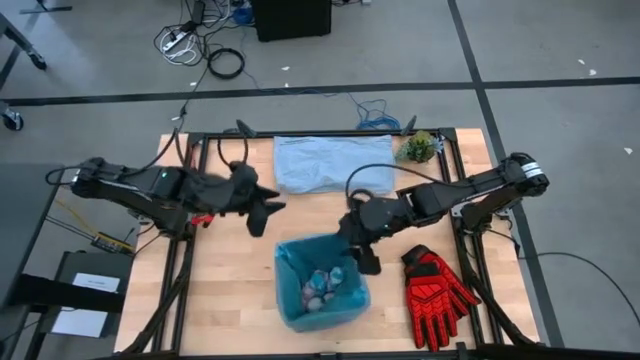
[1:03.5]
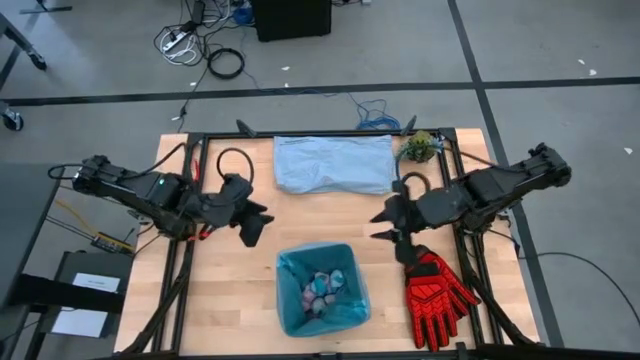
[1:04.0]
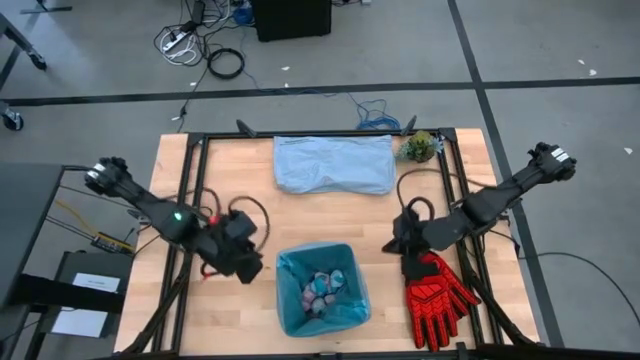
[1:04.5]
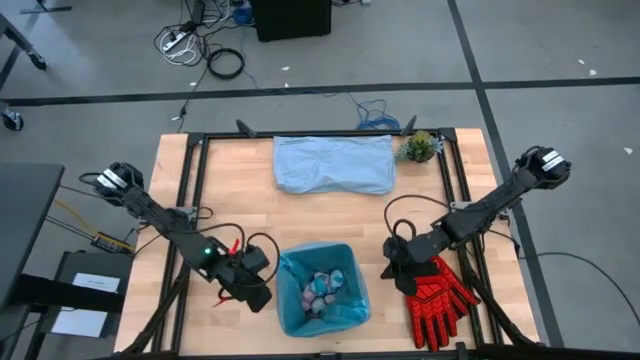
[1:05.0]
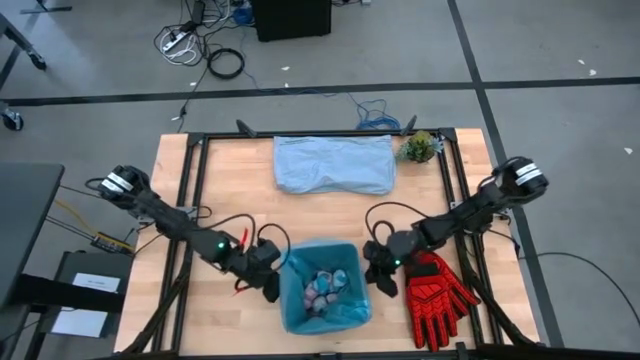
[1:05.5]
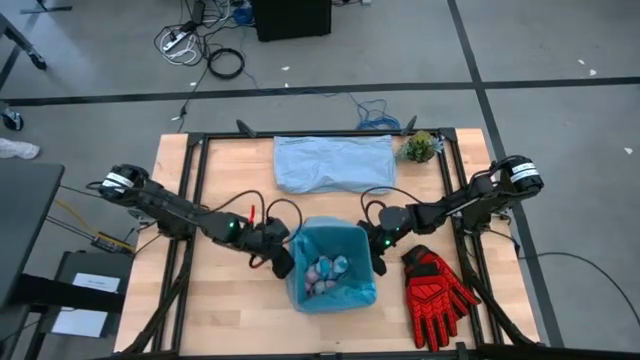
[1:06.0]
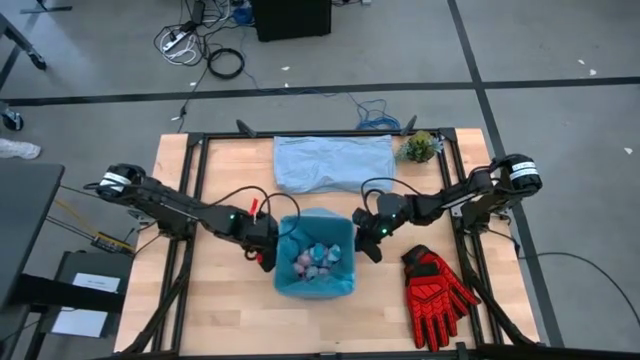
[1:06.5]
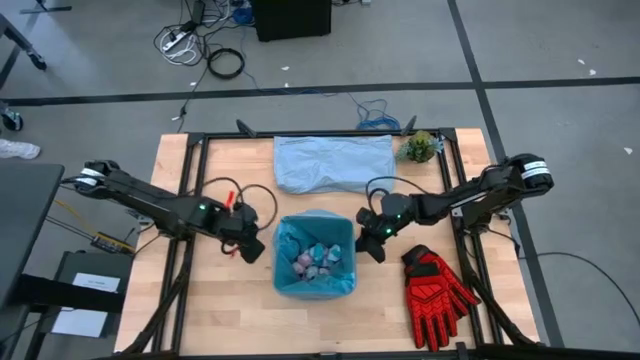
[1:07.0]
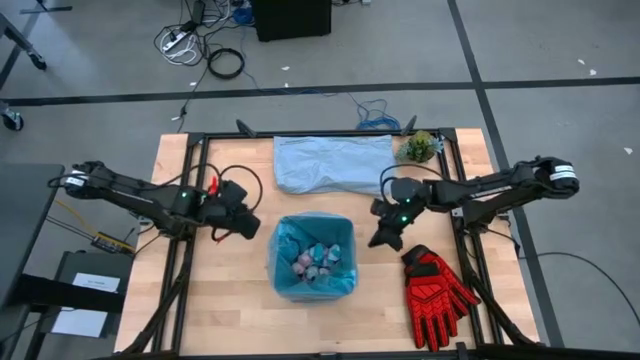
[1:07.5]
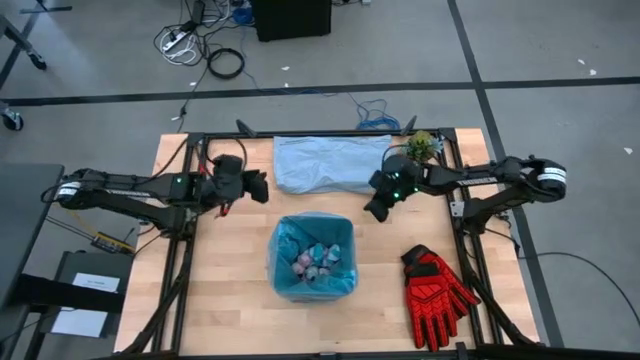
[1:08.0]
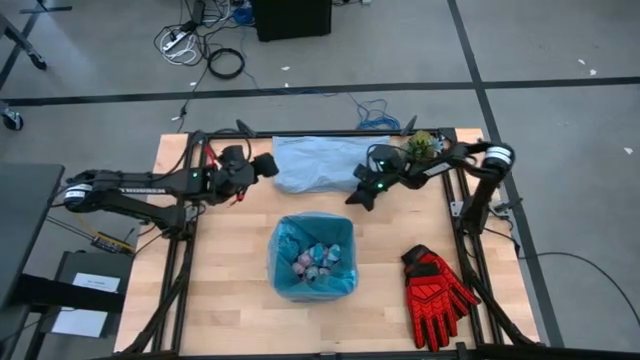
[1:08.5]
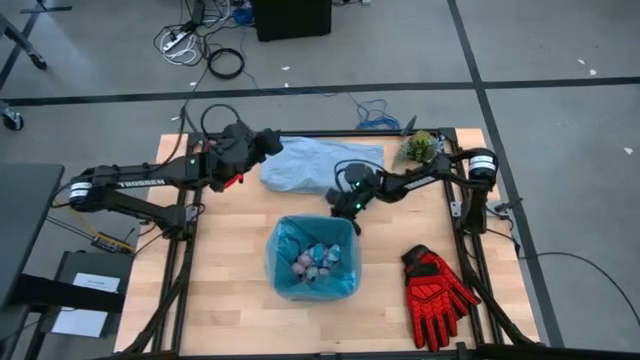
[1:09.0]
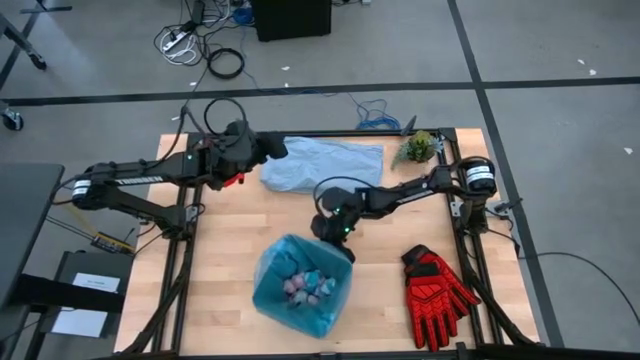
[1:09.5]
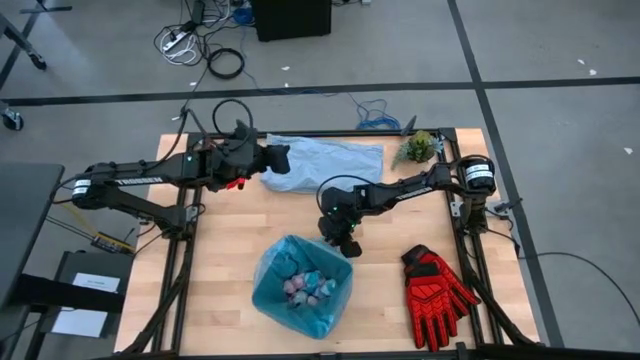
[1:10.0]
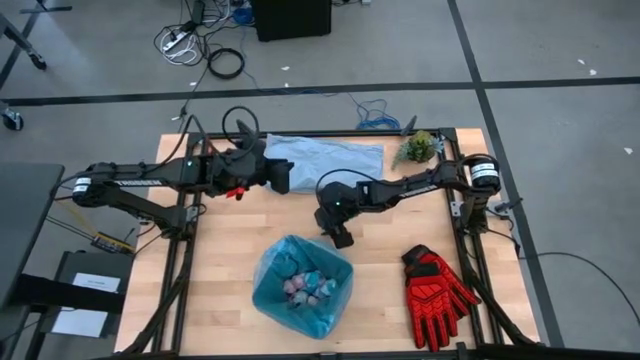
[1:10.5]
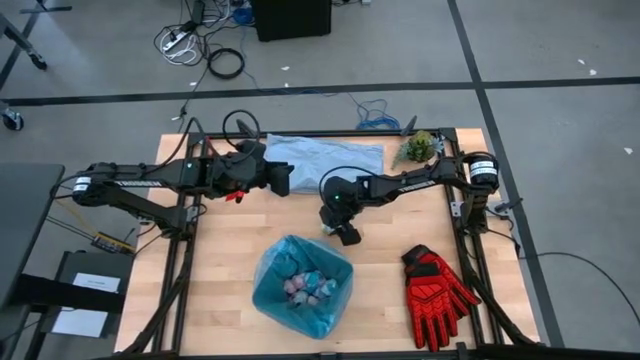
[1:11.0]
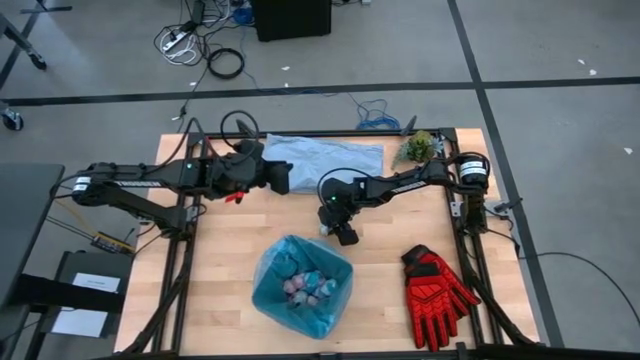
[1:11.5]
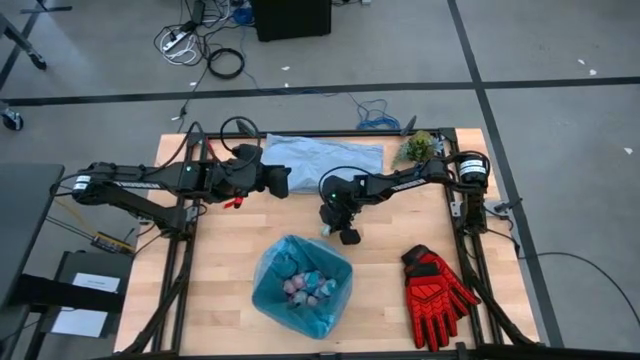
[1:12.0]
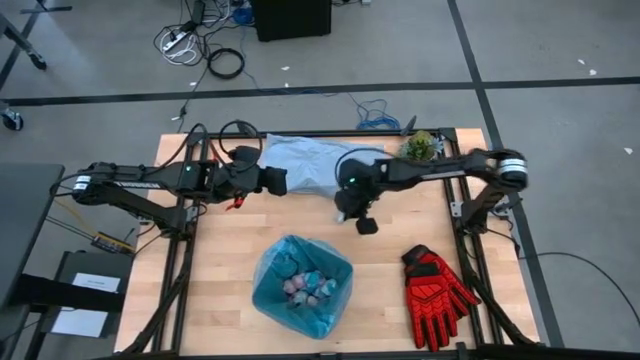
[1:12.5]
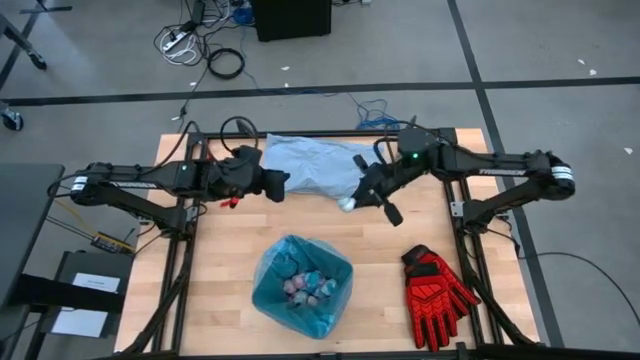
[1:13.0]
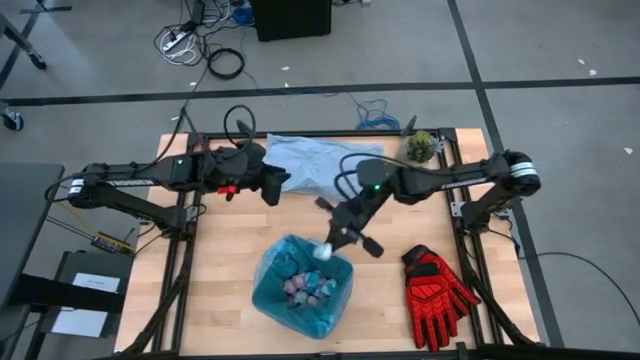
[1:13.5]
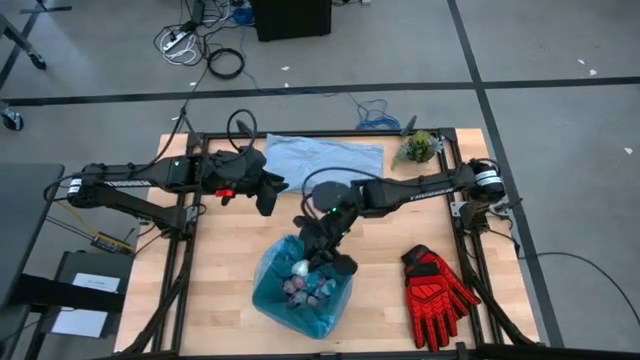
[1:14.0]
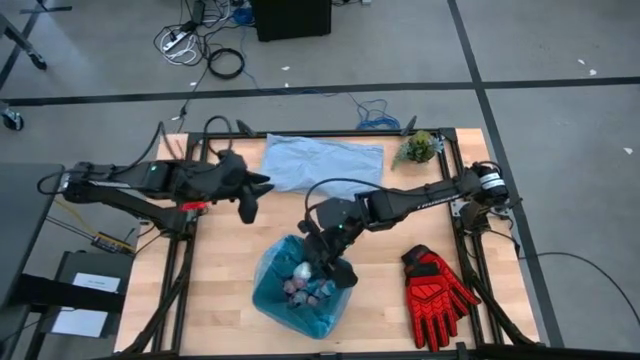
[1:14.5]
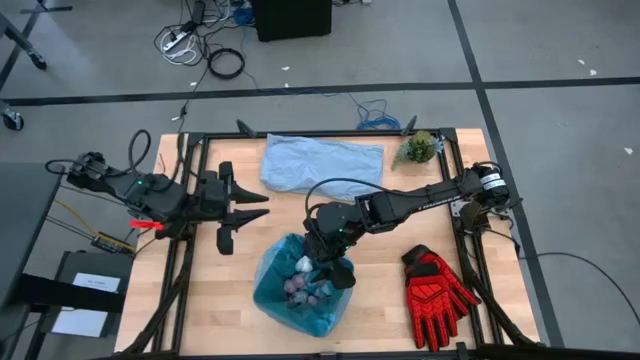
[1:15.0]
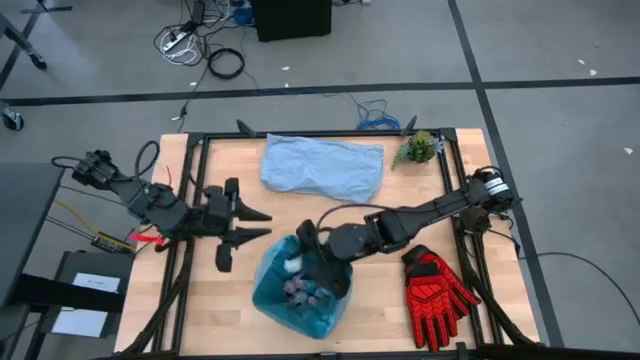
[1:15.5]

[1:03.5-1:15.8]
Task: place trash/remove bag and relplace
Put the blue crumbled trash bag into the trash bin

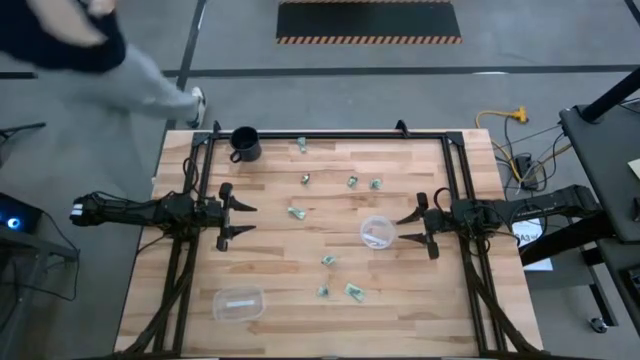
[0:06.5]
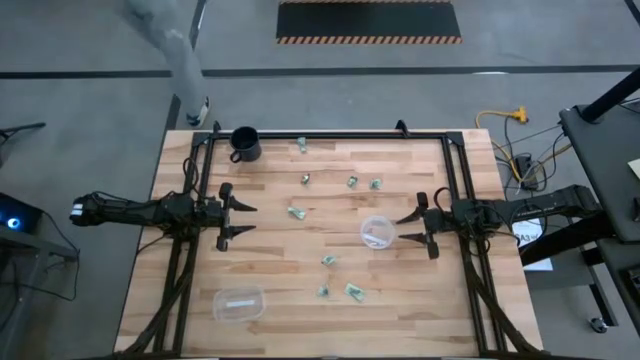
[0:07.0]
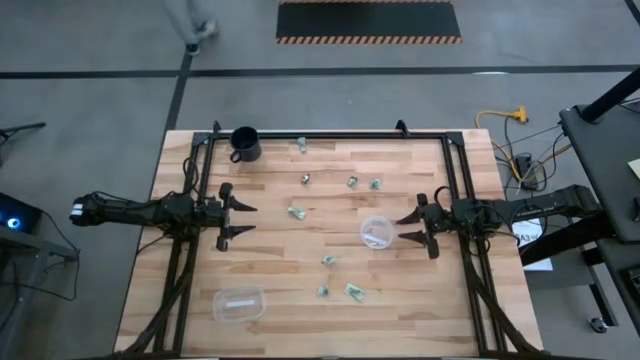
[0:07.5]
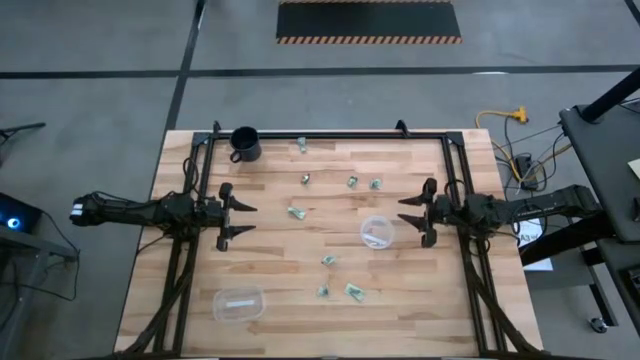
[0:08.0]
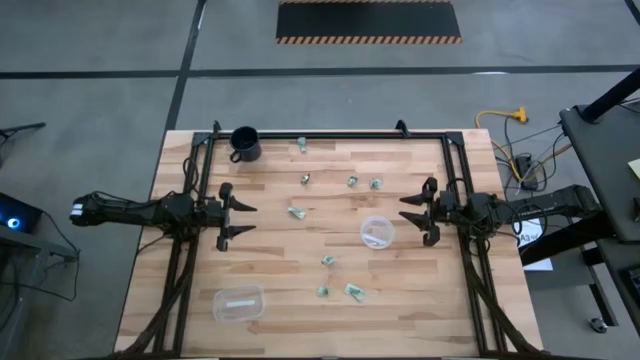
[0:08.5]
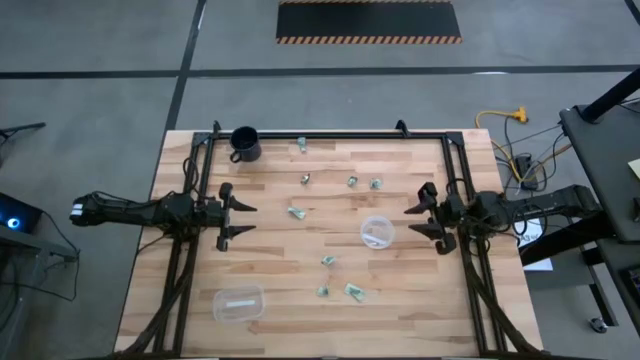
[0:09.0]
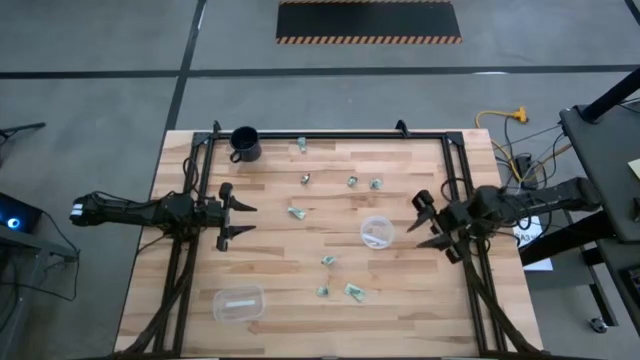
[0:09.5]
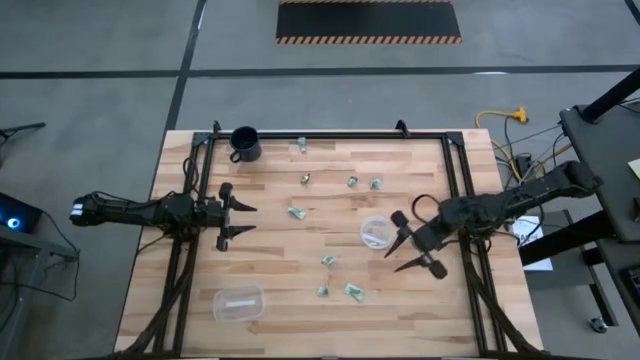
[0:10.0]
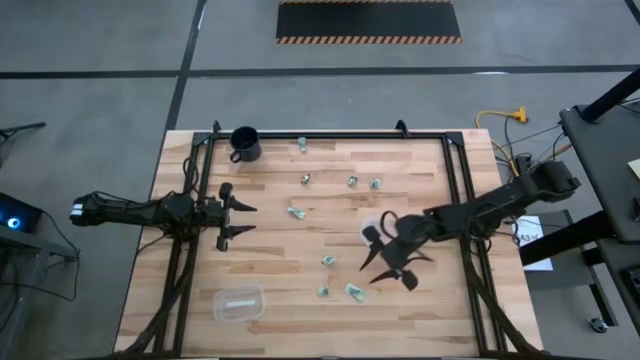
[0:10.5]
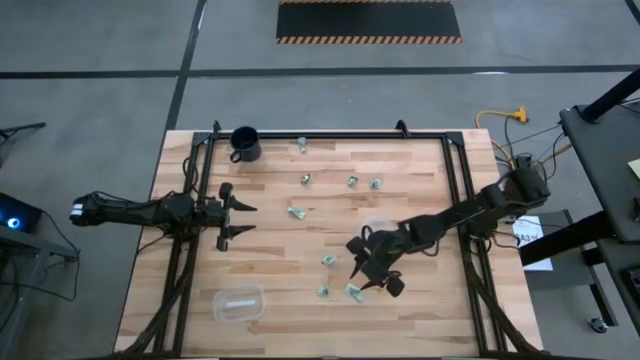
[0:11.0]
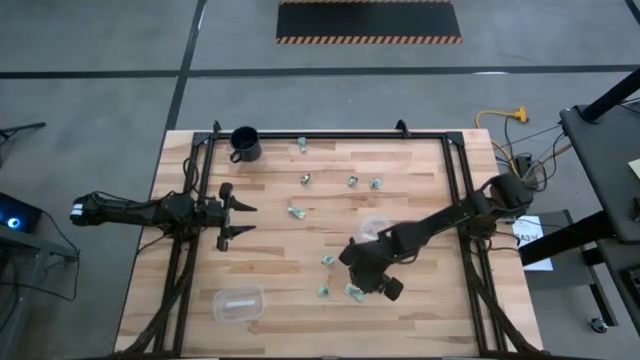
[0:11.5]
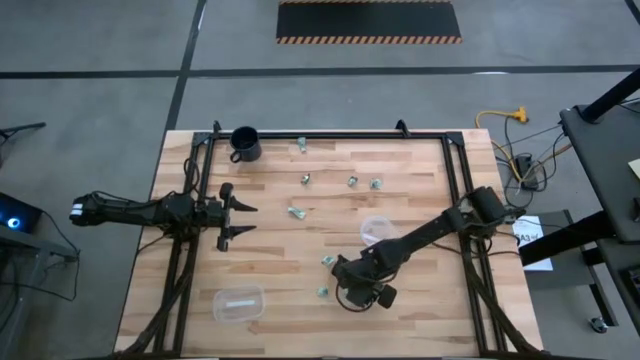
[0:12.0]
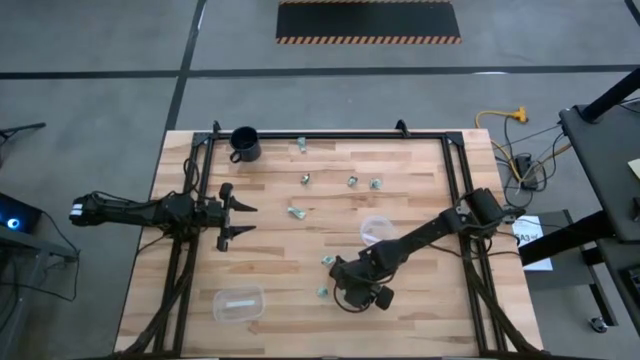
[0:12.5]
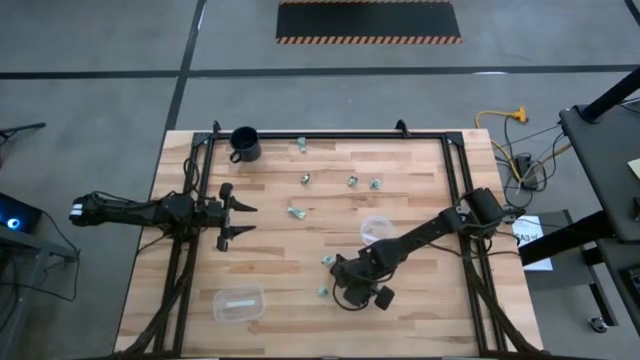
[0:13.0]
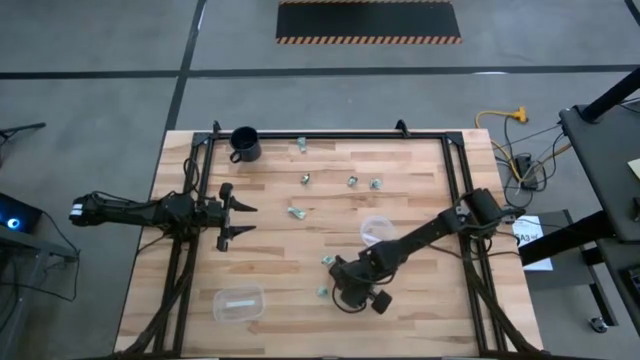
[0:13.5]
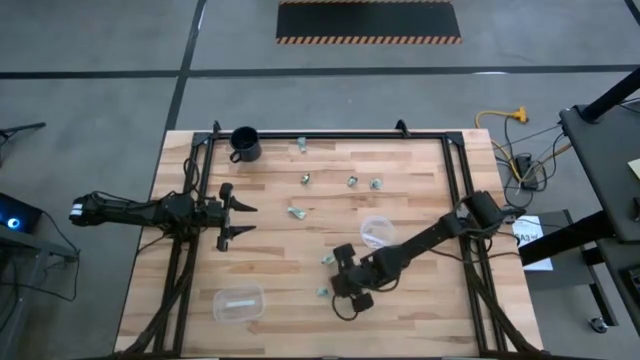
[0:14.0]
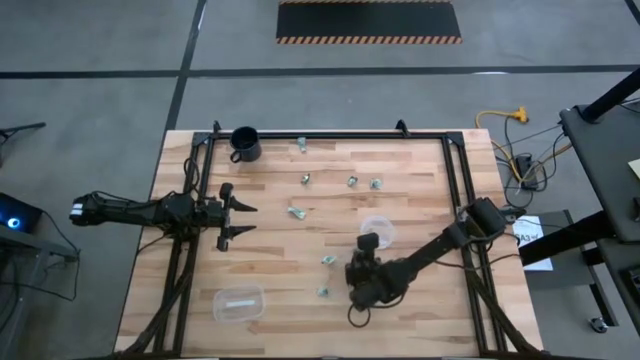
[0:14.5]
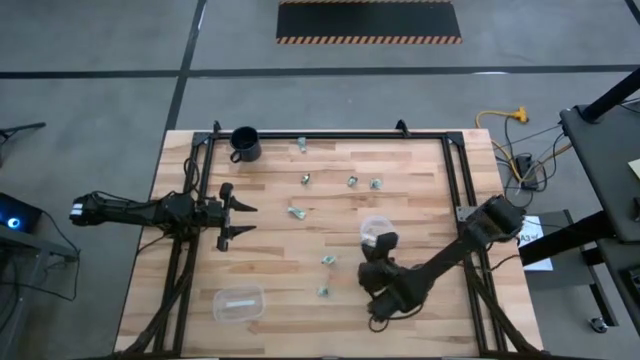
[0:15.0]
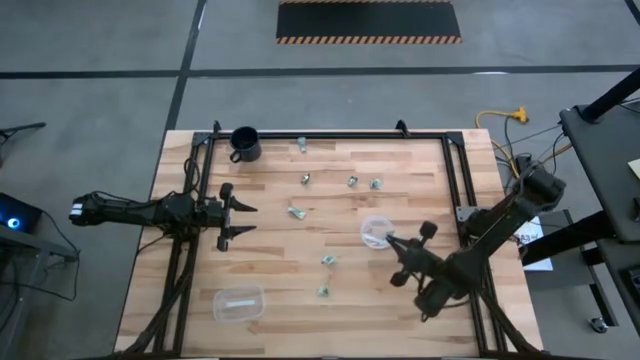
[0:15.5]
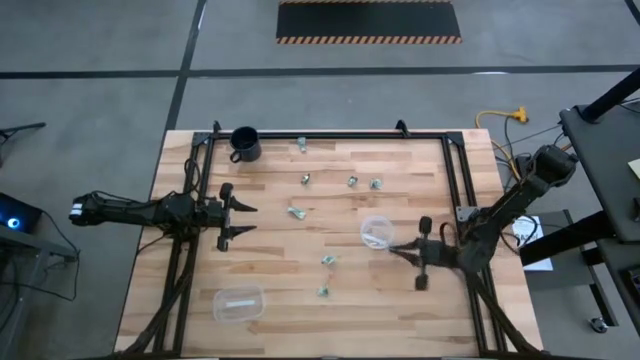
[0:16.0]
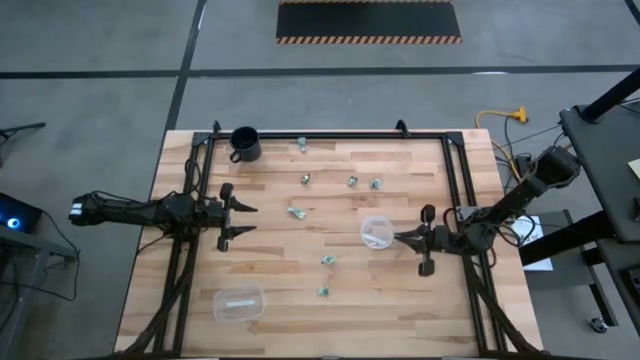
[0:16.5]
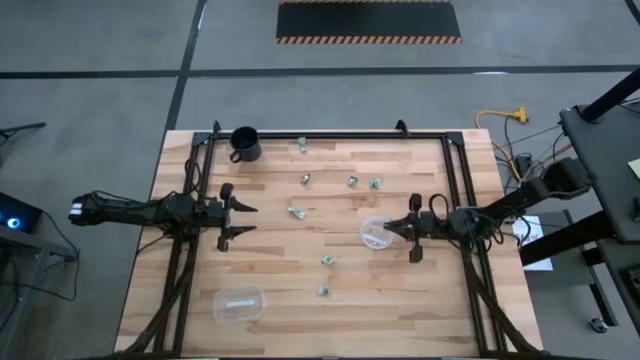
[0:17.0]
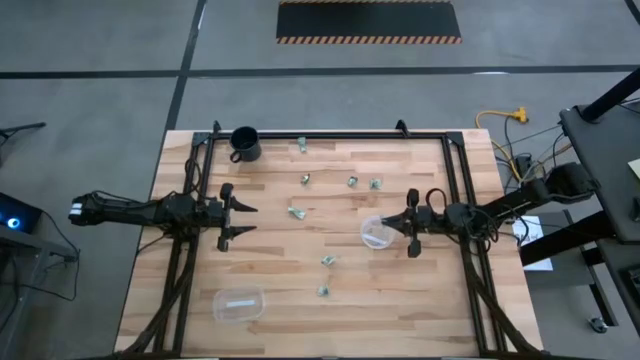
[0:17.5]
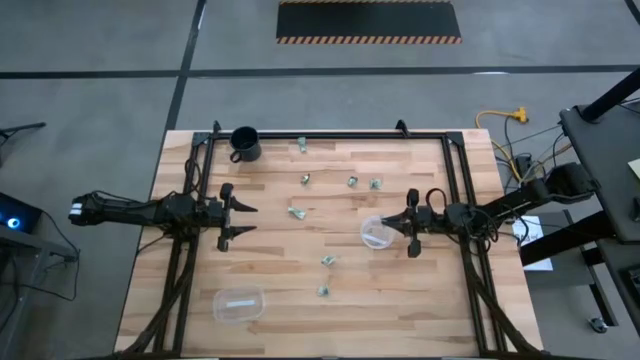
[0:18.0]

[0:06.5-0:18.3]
Task: Pick and place Stevia / Truvia into bins
Put the white stevia packet into the right transparent container
